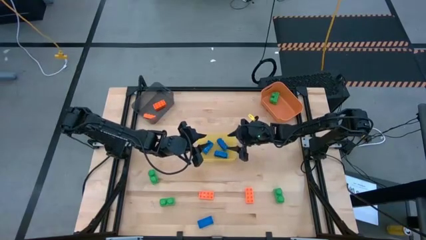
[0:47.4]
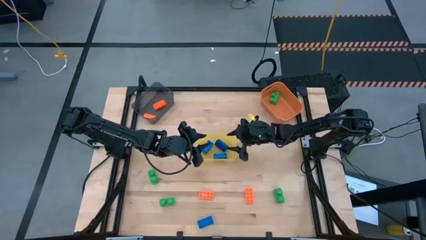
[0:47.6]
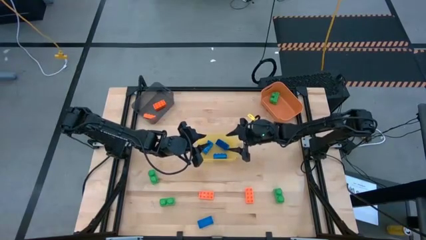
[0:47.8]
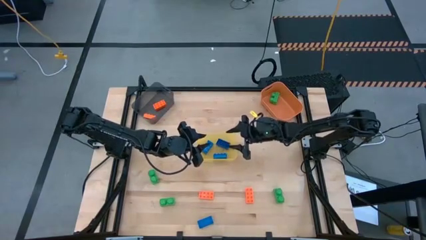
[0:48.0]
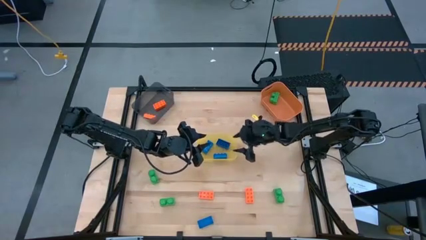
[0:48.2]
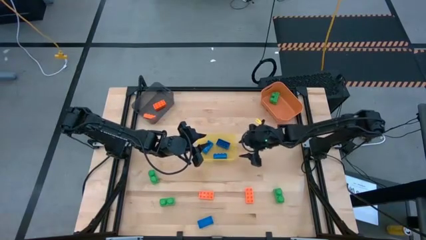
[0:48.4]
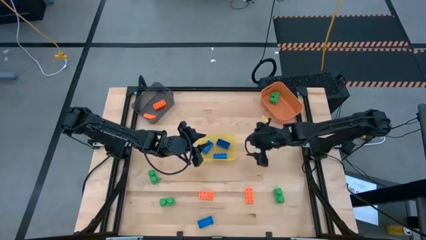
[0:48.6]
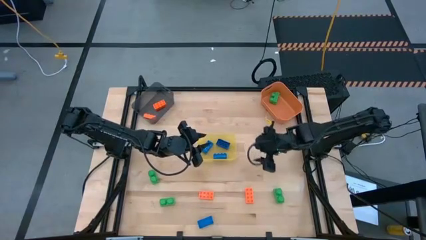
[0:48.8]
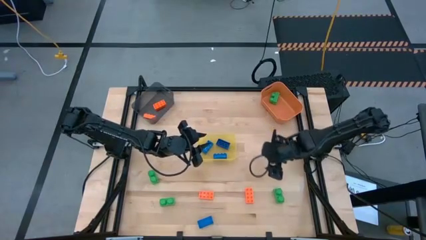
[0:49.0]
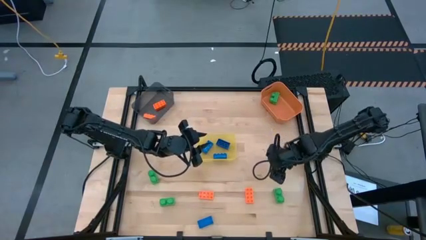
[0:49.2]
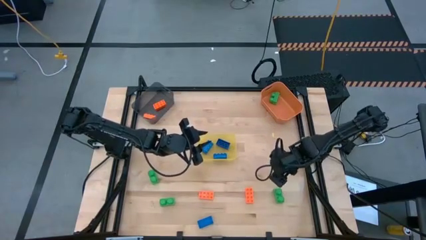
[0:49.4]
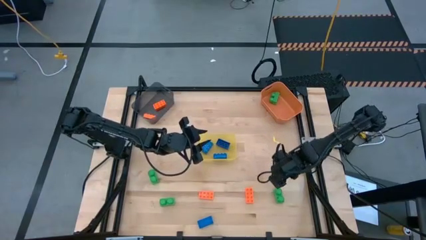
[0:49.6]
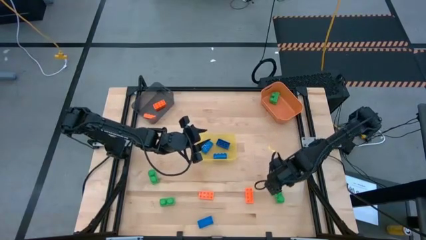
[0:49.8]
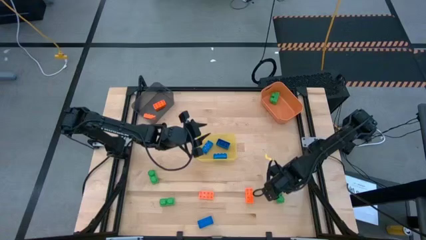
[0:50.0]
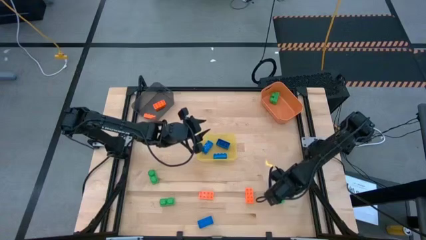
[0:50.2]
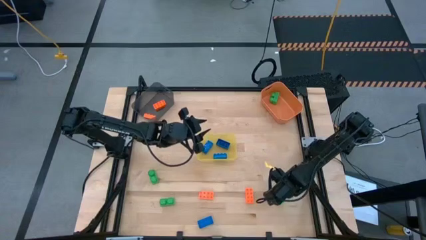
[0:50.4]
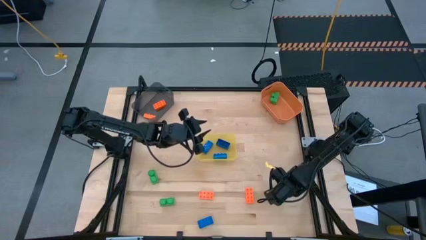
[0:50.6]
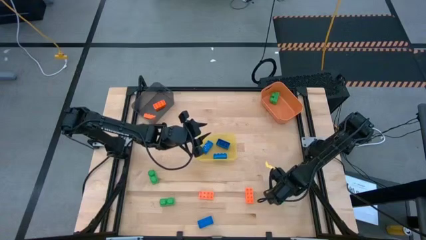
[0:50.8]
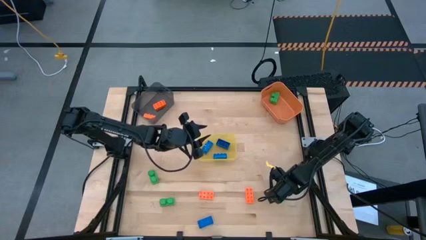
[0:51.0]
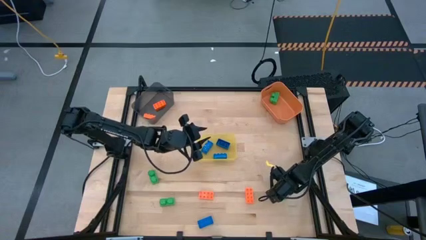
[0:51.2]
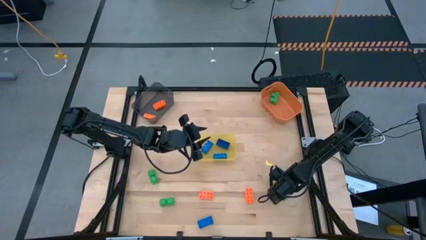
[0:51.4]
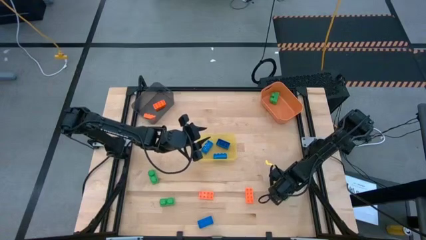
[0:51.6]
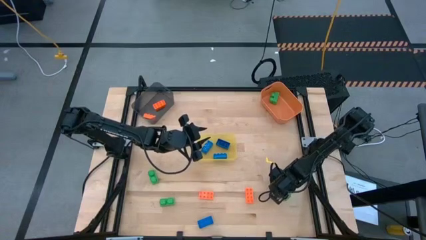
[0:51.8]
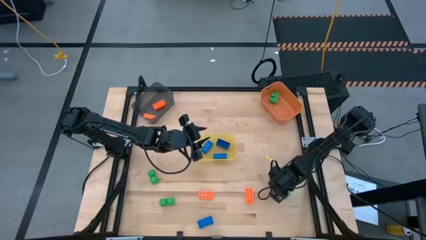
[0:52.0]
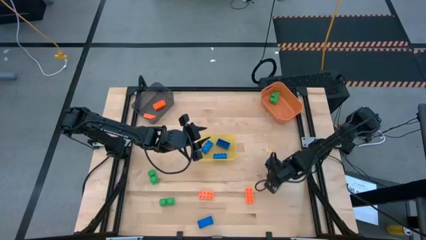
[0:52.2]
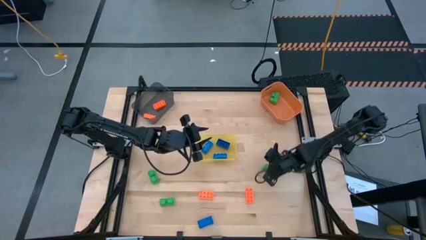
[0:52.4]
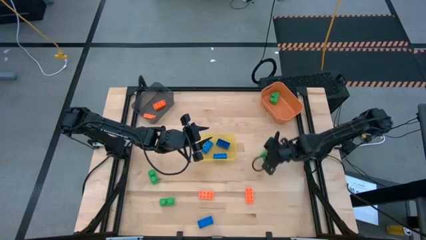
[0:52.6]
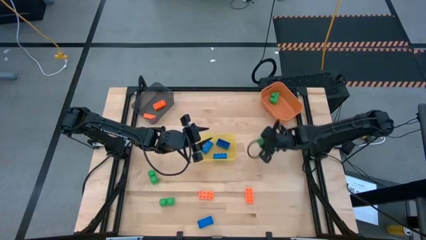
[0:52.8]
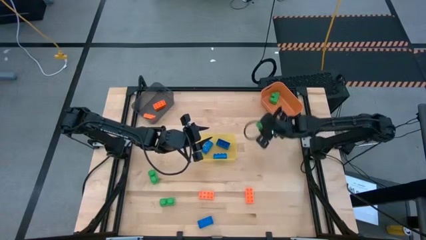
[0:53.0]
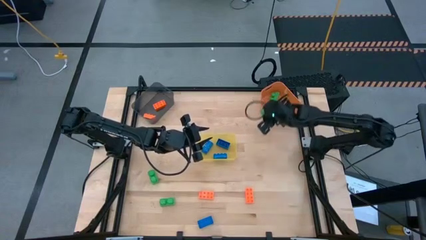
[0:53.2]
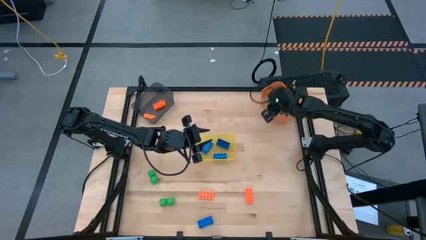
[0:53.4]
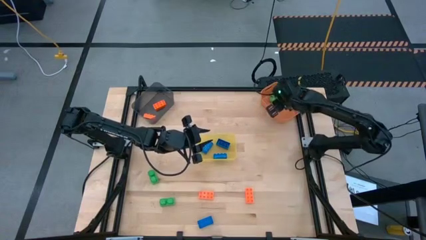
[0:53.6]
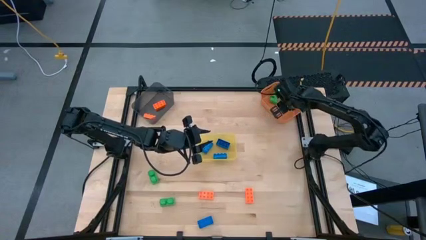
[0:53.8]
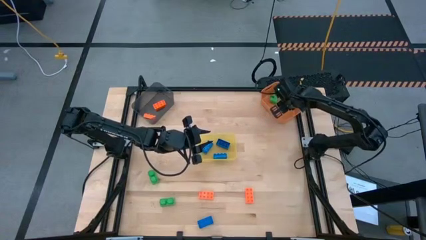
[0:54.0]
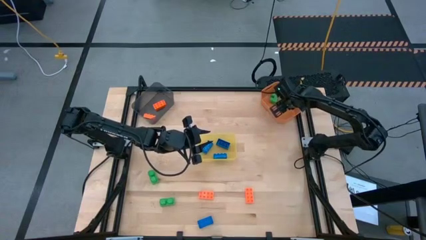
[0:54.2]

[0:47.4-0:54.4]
Task: Sort & place blocks by color
Put the green game piece into the orange bin

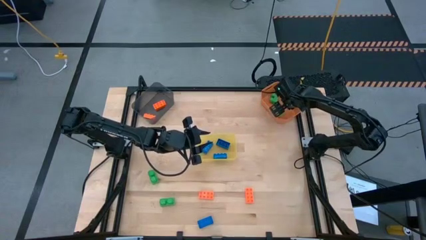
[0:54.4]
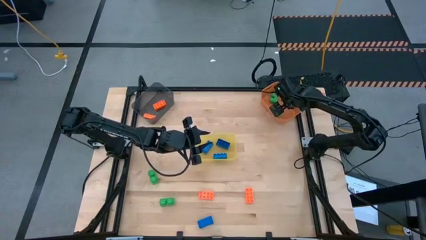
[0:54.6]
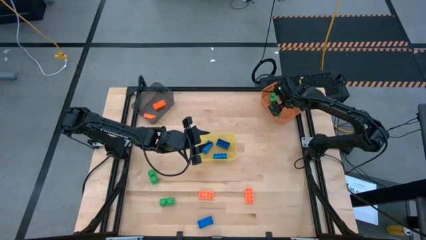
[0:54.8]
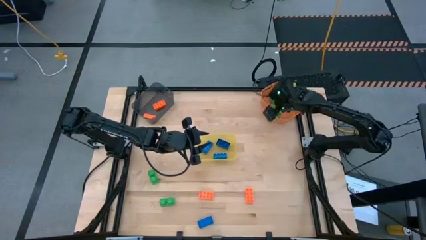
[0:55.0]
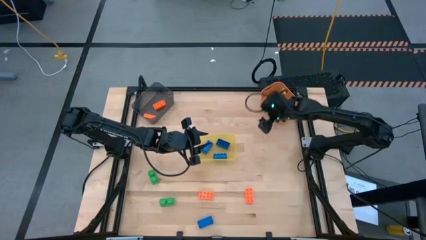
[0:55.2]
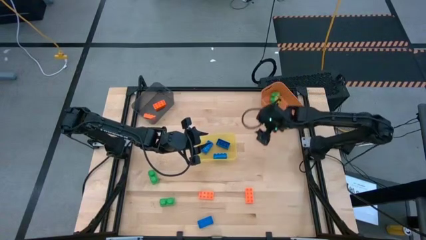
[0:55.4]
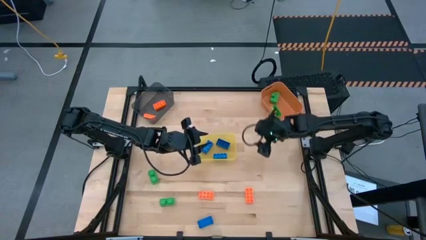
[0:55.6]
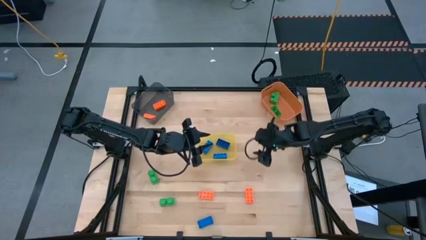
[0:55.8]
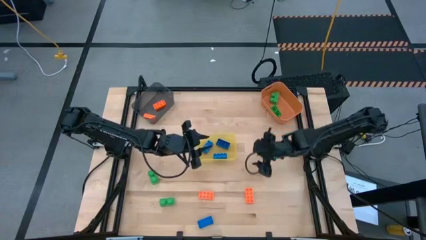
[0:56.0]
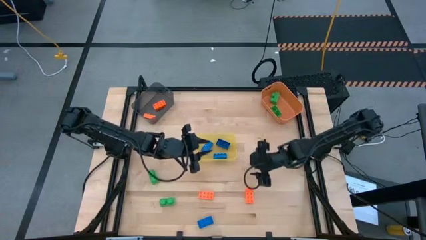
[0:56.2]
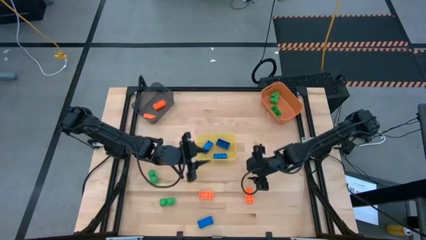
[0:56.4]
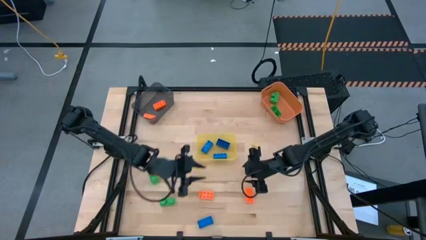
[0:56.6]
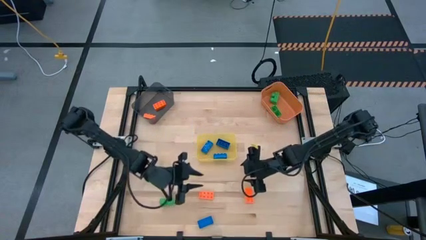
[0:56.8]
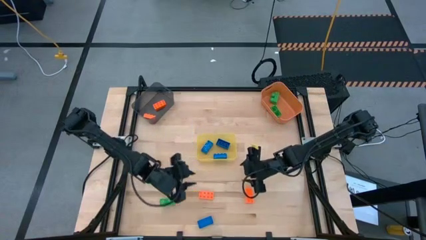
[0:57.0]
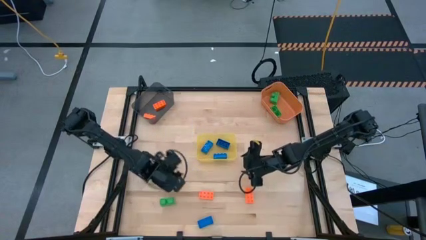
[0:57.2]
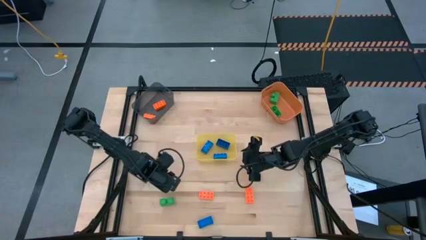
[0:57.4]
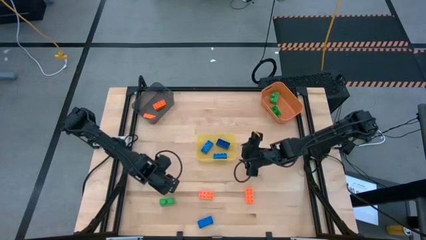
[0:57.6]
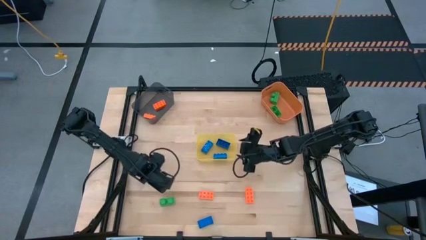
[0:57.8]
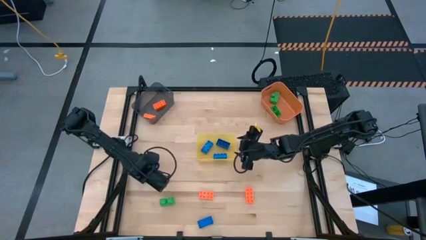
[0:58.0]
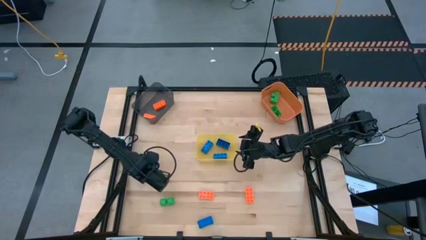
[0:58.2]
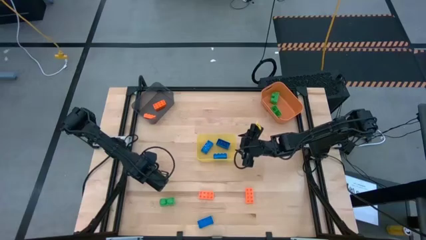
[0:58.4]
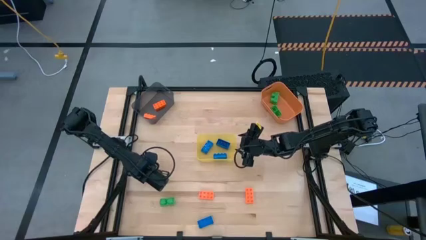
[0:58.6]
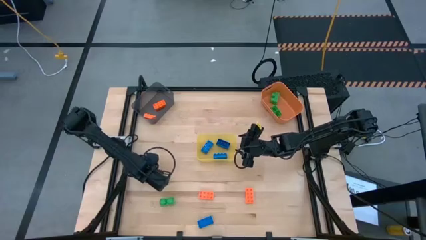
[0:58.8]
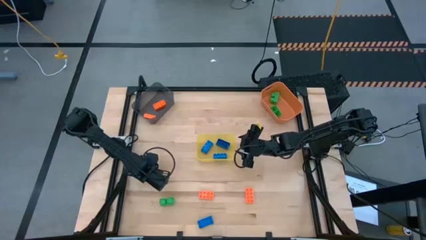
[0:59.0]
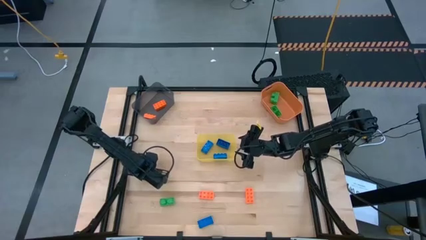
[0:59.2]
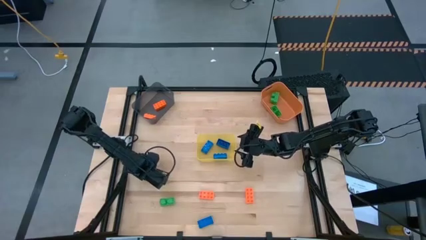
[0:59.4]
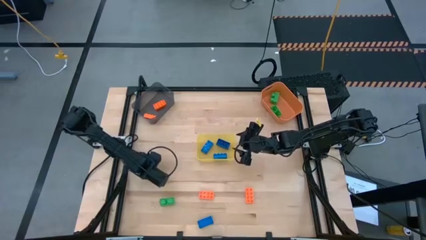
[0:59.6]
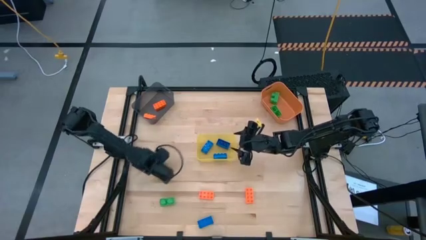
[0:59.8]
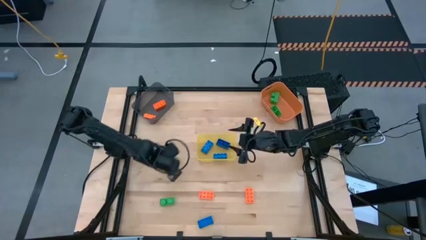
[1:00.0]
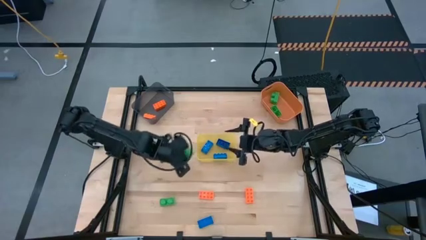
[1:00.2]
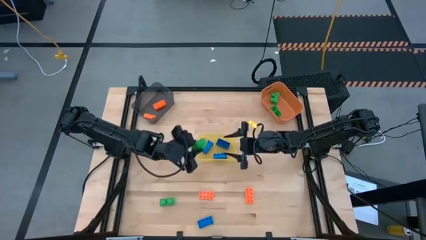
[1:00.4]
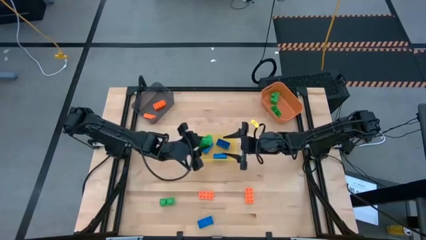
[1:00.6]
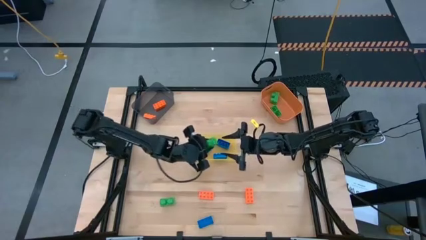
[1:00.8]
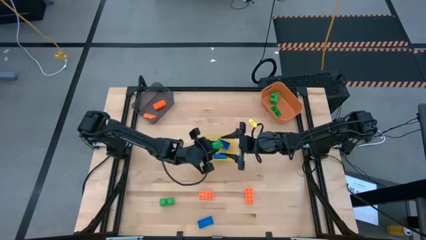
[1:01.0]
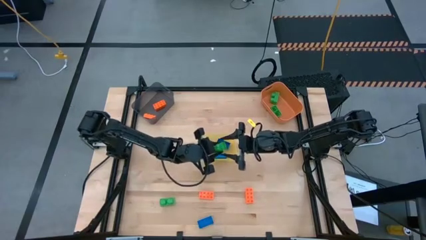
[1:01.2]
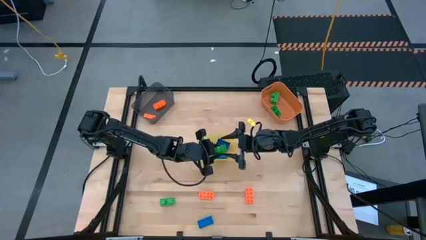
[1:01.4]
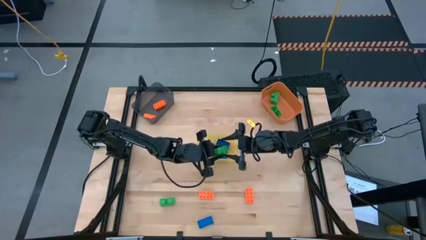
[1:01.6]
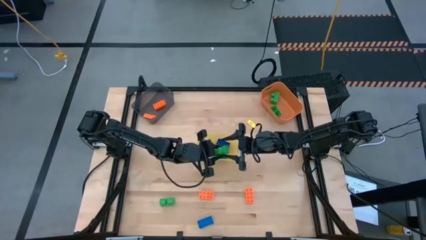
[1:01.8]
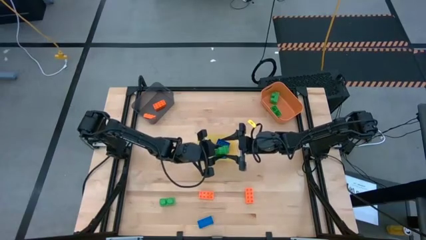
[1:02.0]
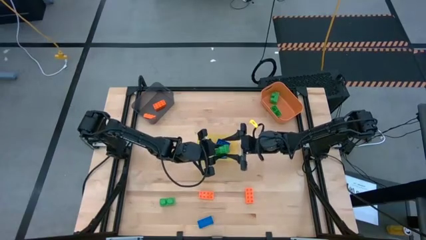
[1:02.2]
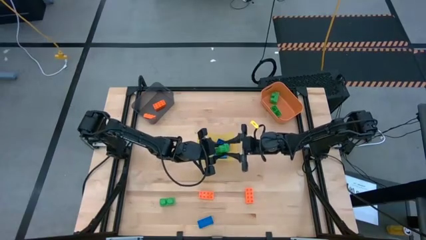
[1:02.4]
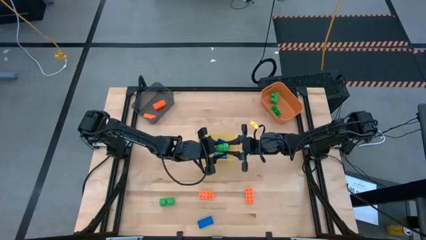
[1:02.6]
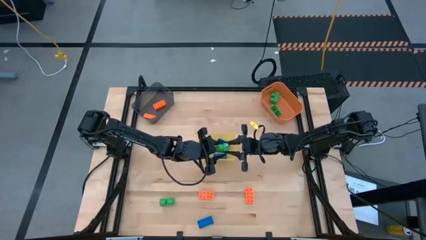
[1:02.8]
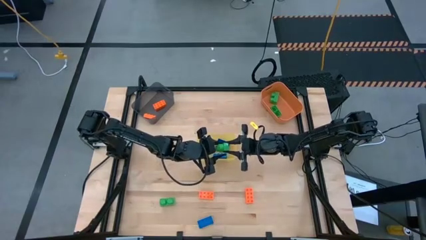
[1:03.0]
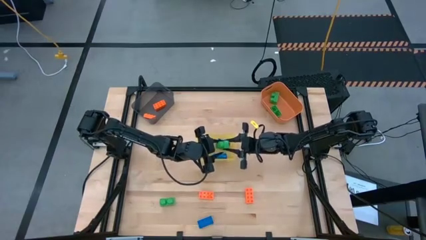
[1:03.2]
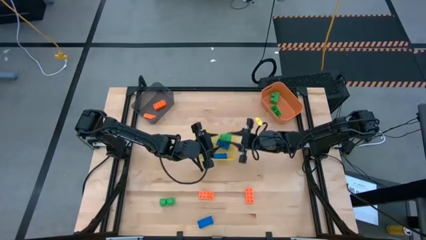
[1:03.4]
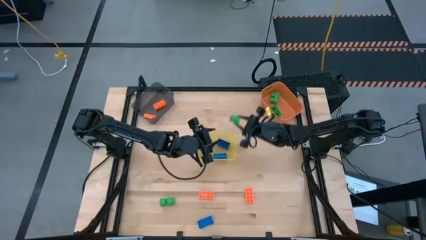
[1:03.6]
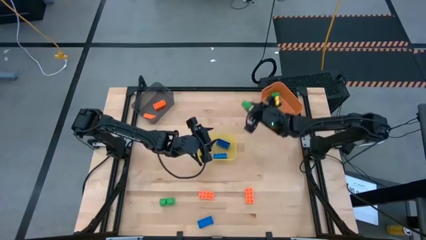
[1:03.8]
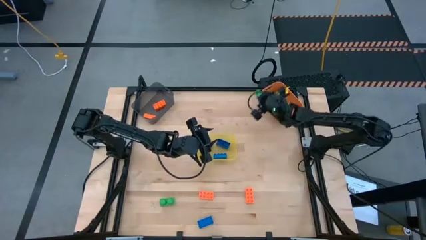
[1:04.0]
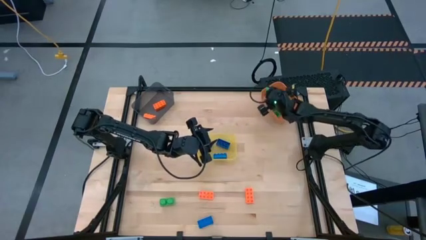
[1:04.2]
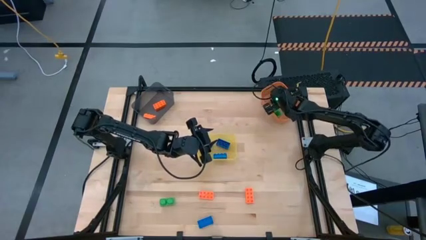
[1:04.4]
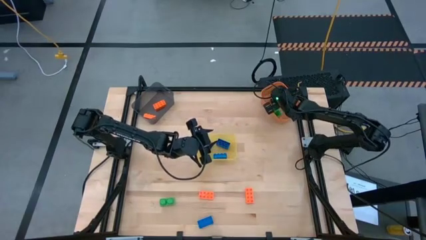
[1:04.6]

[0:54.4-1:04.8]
Put the green game piece into the orange bin
